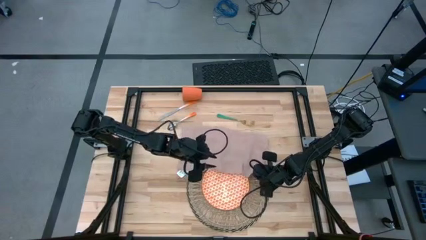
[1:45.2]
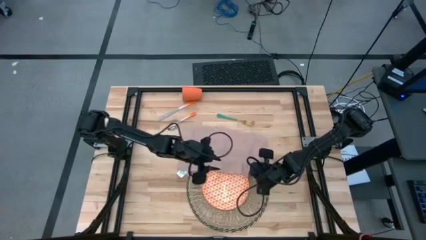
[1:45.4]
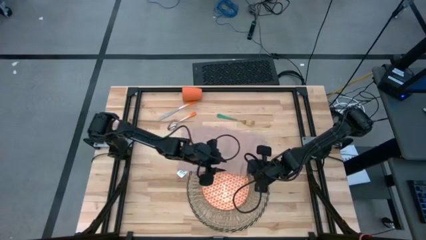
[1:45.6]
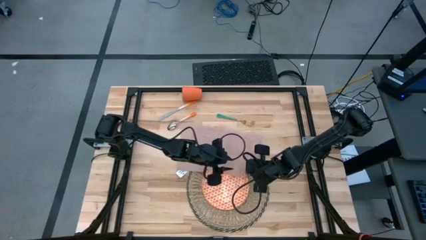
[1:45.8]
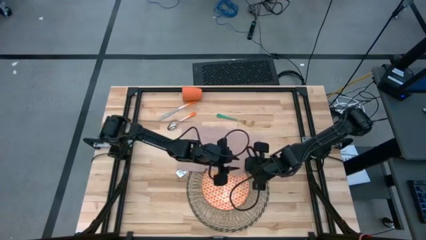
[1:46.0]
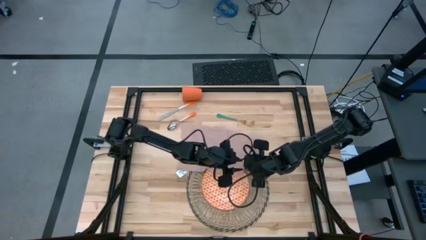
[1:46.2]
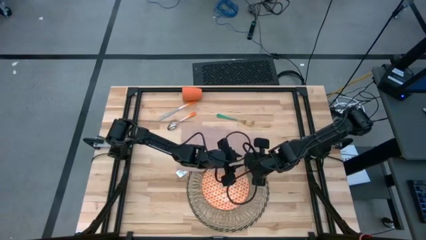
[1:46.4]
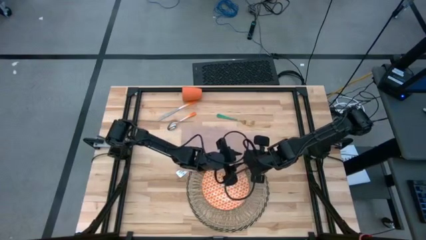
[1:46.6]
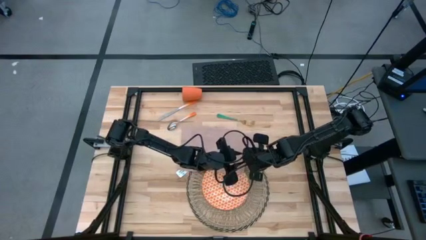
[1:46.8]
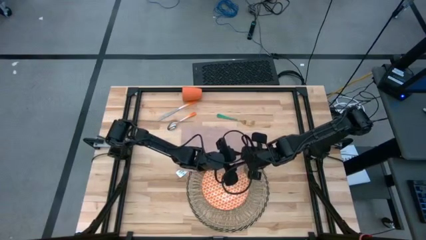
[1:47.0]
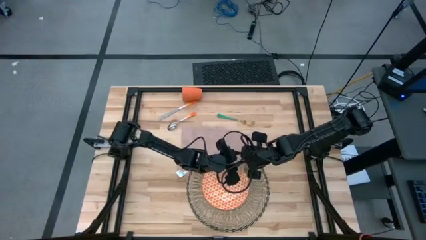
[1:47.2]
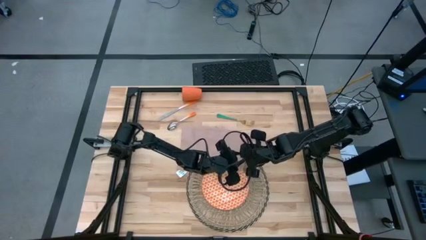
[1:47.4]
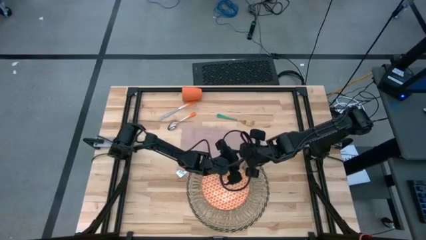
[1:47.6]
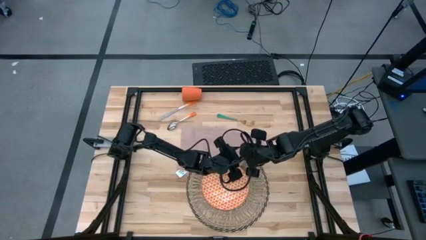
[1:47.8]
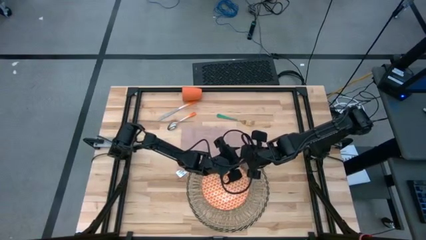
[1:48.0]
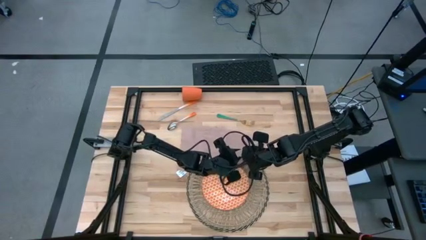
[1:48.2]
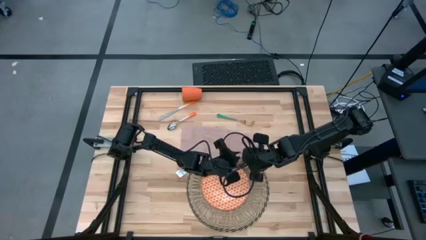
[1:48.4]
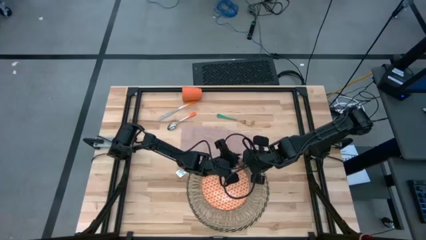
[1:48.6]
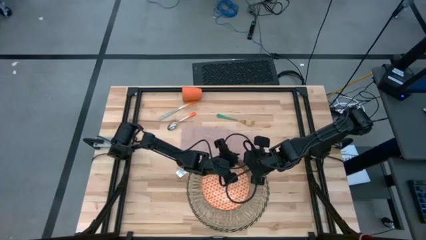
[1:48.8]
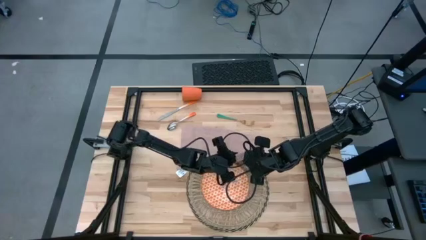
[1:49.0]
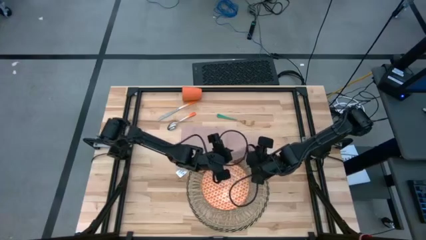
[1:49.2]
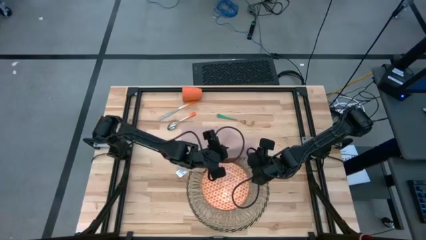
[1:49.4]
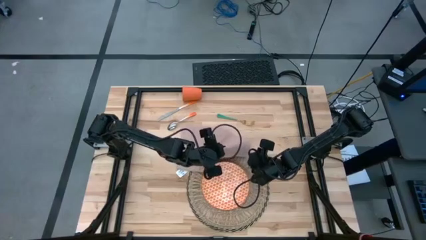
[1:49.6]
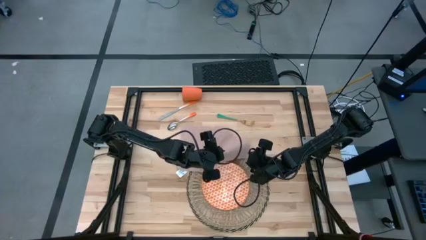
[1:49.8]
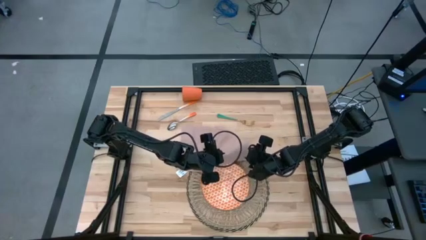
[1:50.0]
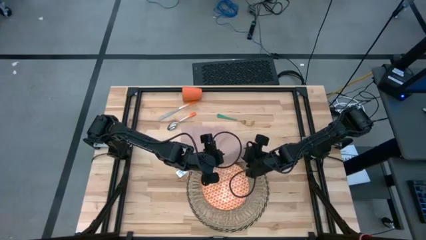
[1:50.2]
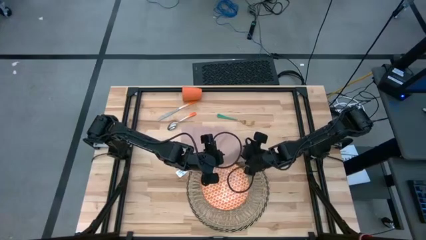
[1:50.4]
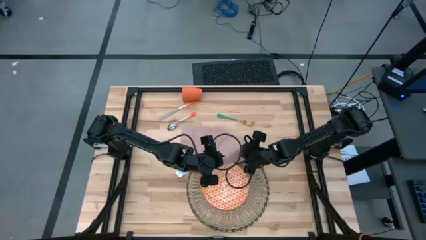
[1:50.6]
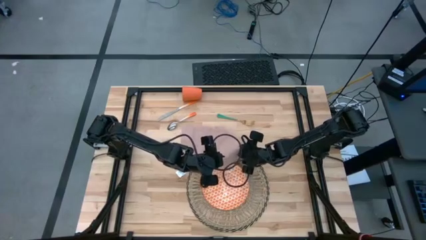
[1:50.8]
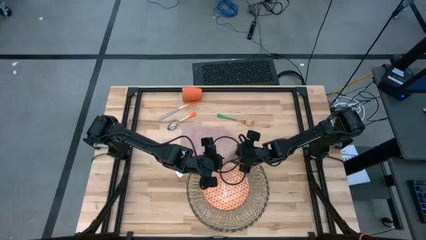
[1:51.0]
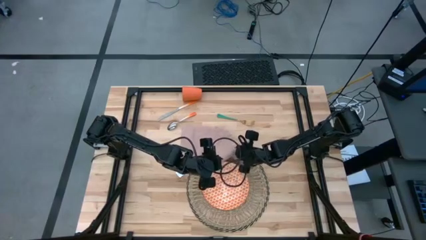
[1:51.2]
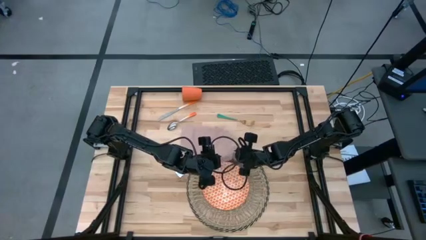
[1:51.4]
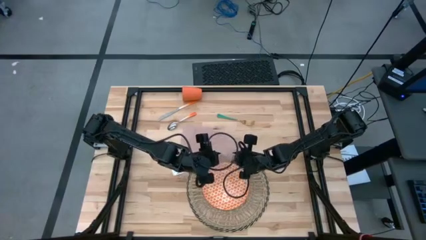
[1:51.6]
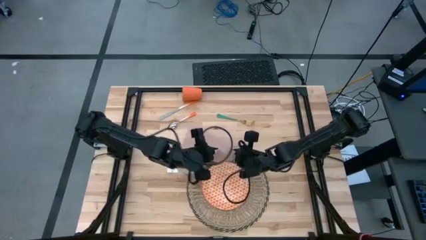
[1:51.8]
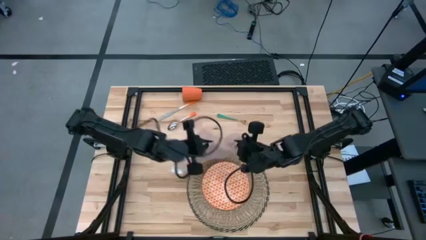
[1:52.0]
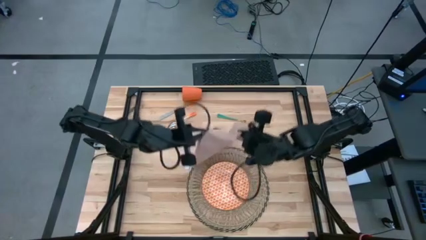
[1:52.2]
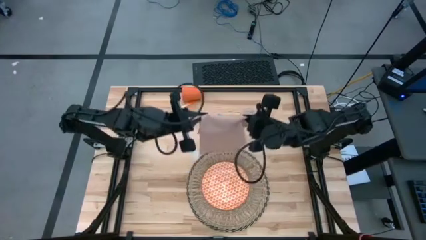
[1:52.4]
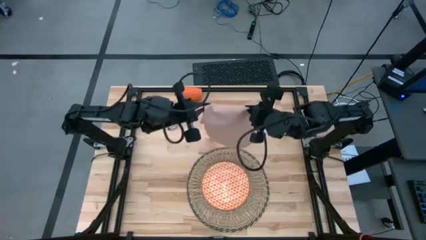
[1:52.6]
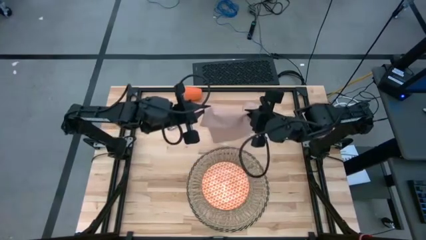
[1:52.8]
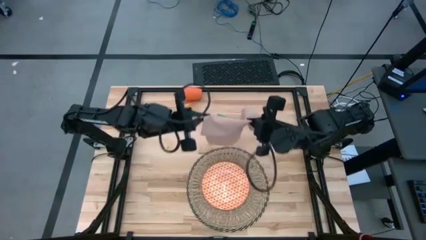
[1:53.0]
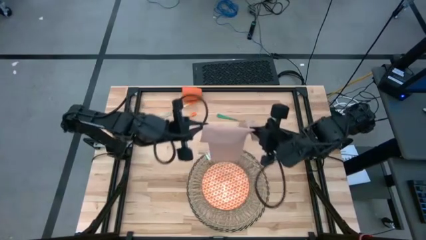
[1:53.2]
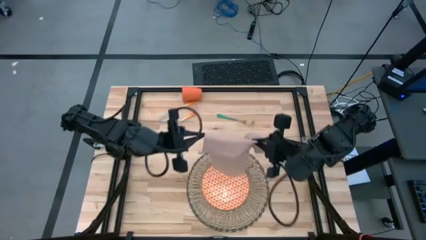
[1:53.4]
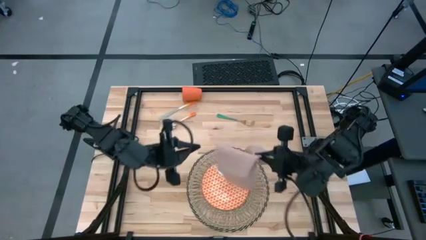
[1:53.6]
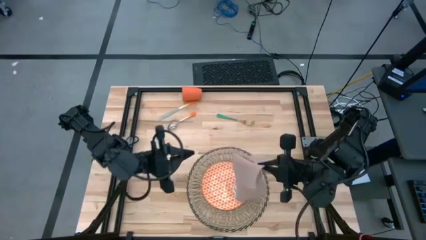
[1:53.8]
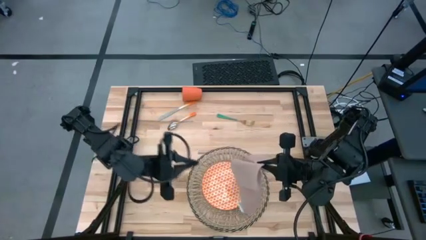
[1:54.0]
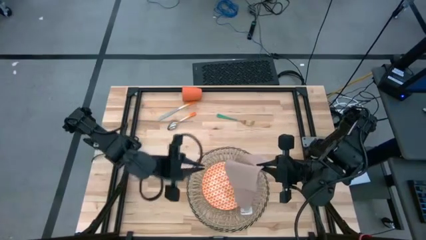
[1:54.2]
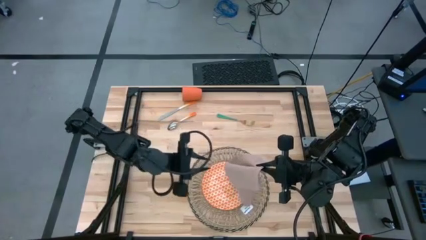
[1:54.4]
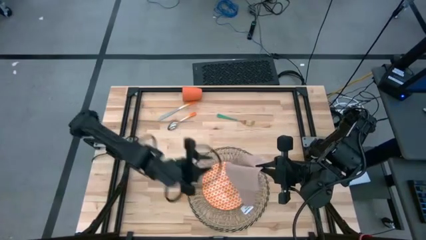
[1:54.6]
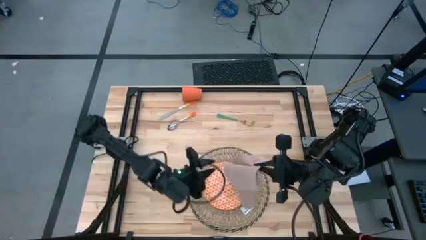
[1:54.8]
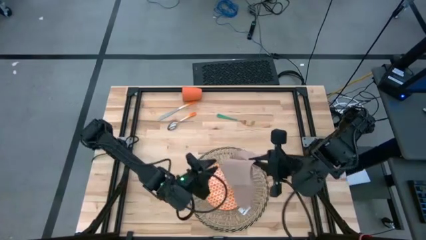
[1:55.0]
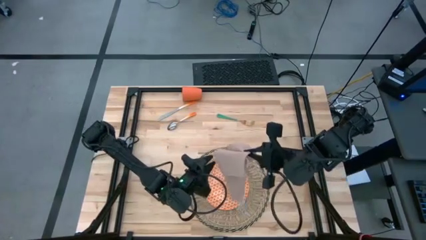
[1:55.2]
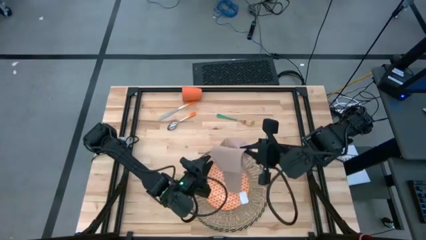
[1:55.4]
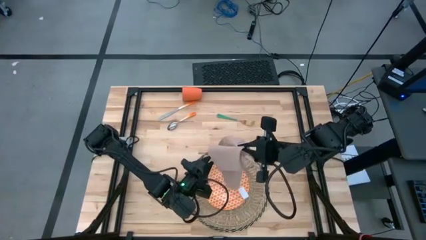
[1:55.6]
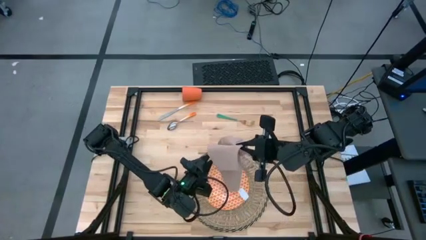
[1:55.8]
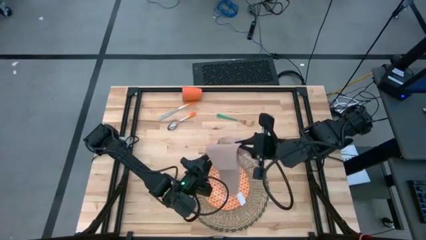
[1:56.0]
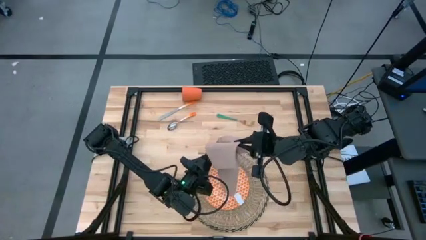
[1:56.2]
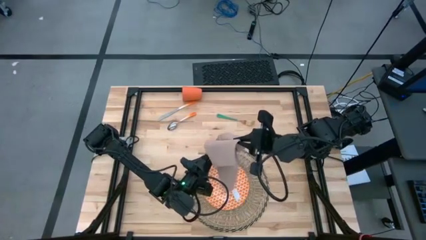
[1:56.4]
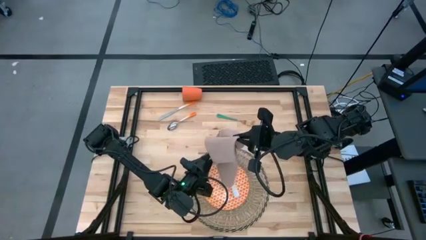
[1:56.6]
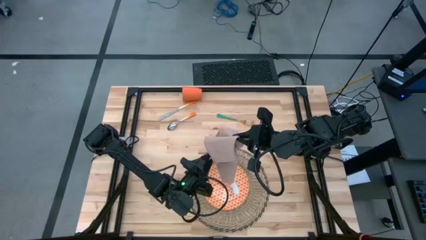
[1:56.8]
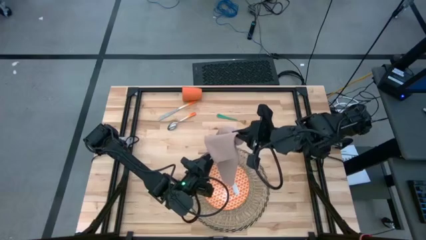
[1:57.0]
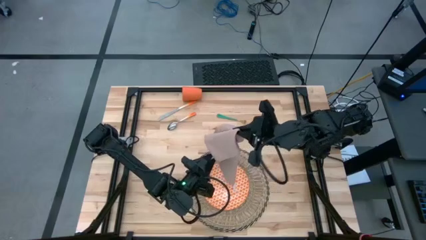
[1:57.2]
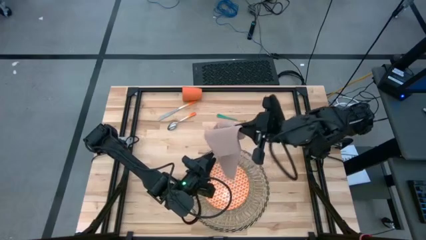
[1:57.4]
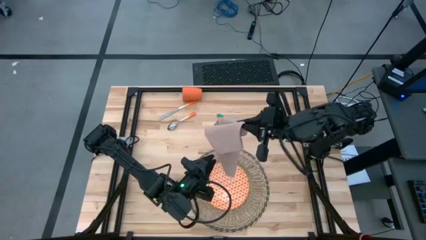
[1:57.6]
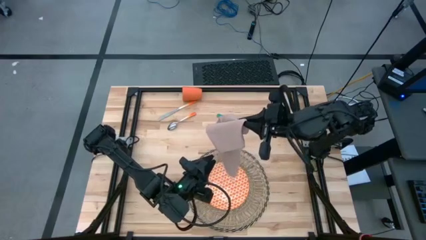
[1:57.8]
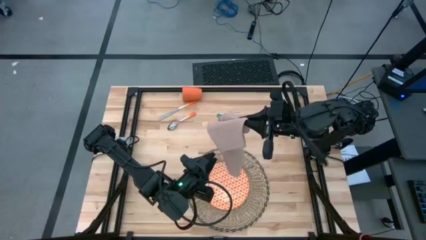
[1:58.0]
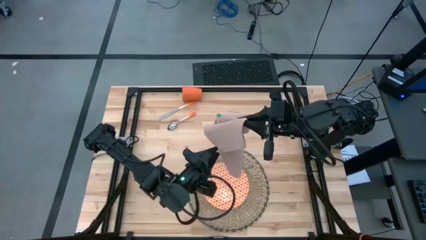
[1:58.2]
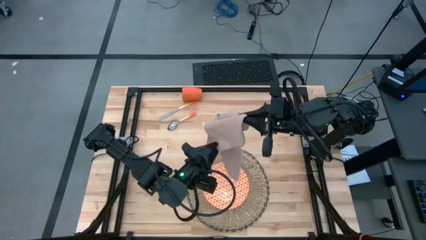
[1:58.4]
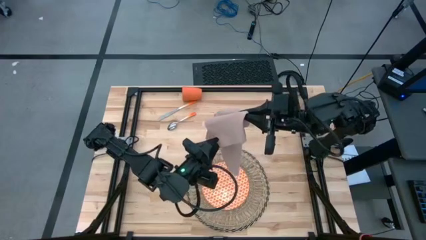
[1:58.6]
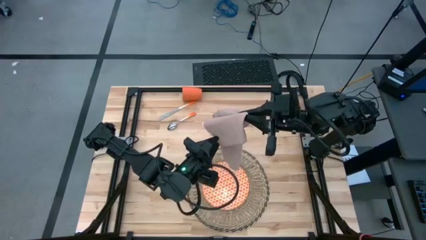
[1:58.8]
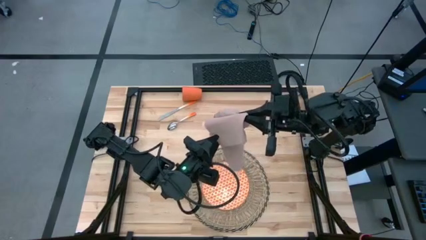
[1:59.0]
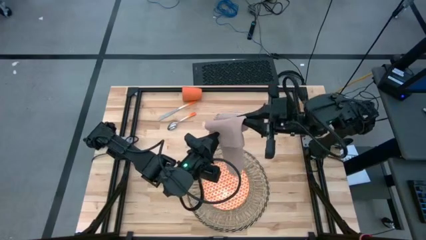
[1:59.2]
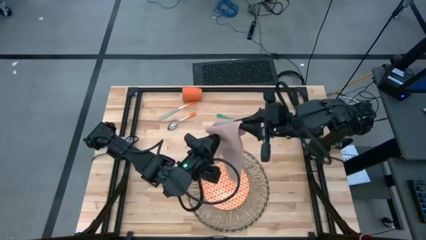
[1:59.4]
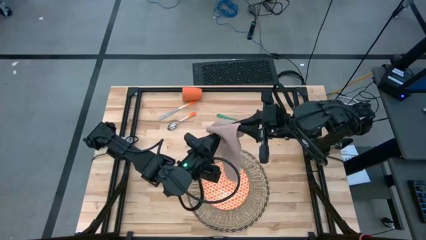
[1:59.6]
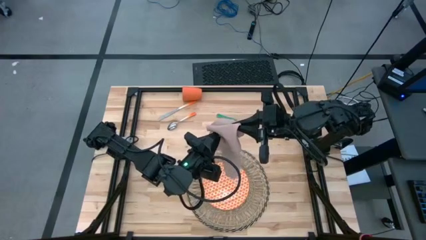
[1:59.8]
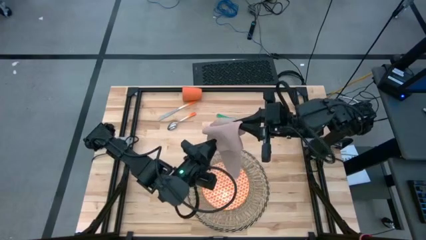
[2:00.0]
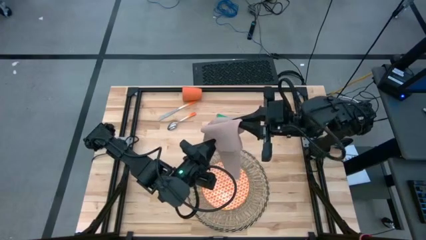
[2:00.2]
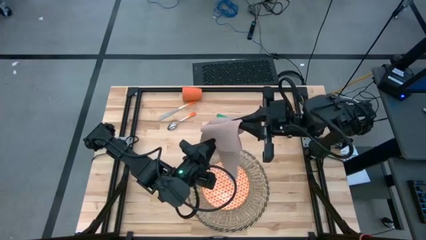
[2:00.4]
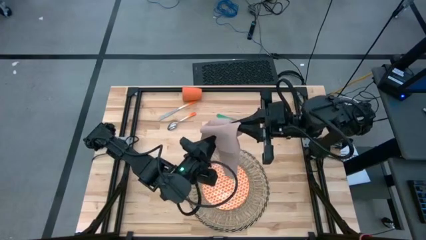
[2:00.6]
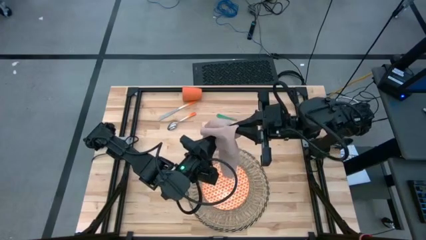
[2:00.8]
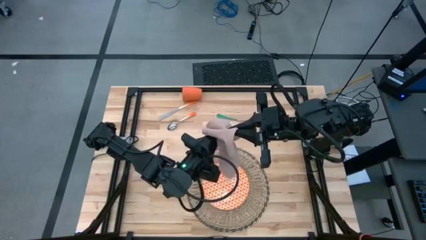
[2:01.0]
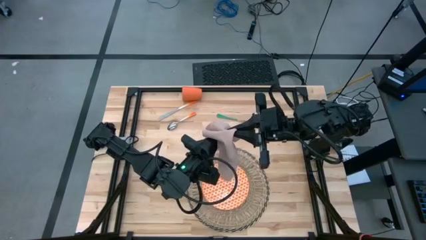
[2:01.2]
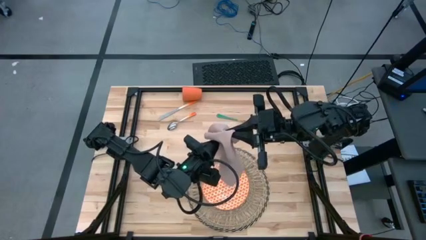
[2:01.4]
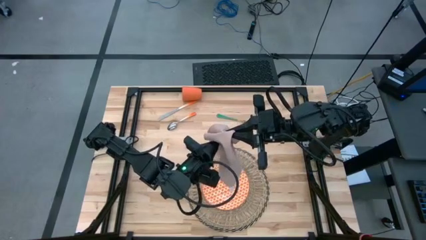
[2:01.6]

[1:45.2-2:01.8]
Task: Set table place
Fold the napkin
